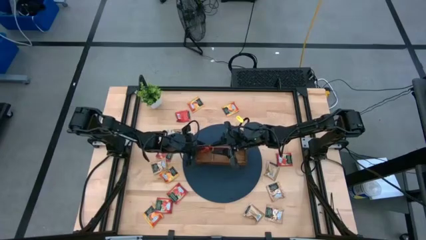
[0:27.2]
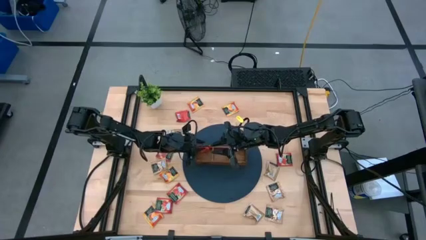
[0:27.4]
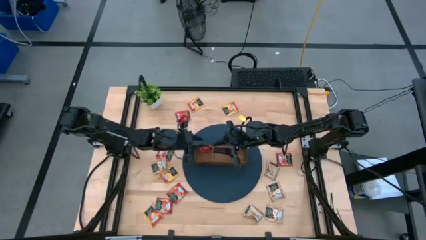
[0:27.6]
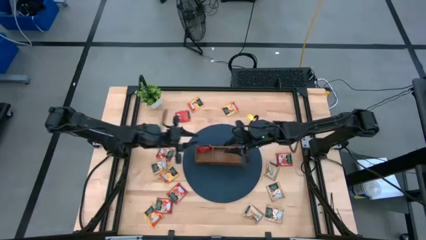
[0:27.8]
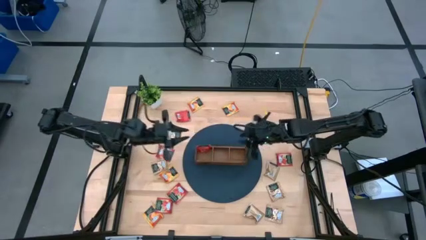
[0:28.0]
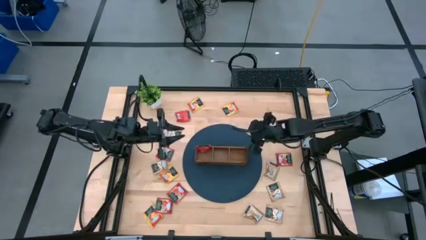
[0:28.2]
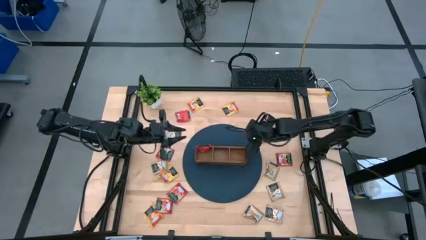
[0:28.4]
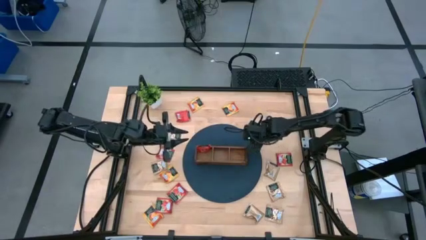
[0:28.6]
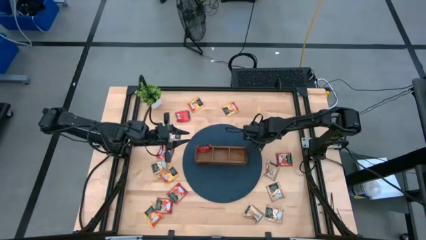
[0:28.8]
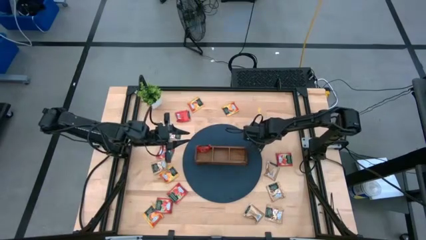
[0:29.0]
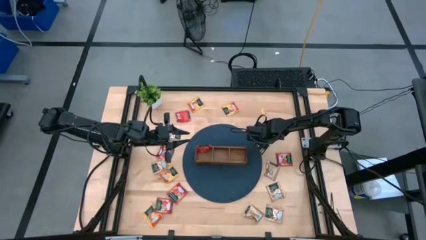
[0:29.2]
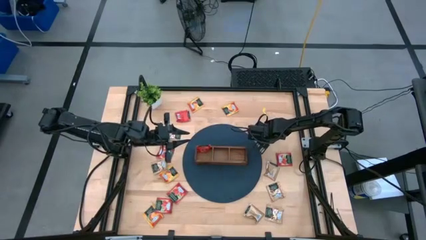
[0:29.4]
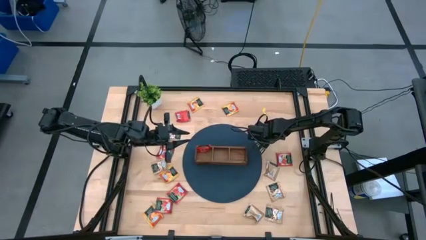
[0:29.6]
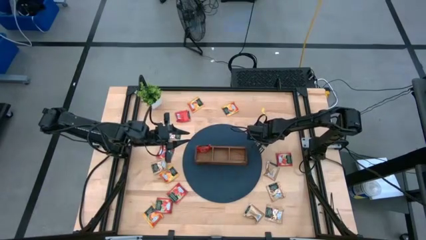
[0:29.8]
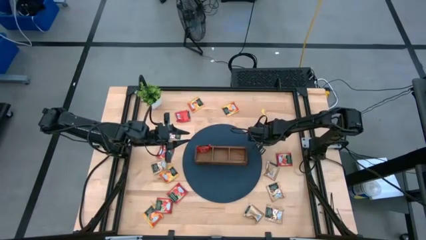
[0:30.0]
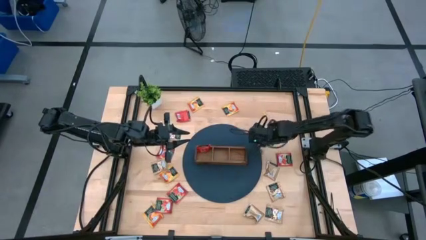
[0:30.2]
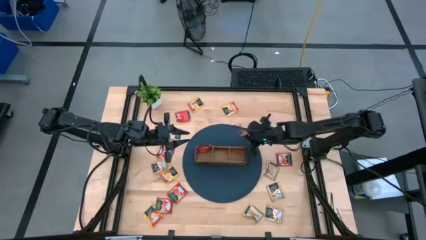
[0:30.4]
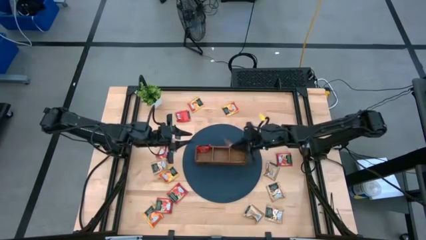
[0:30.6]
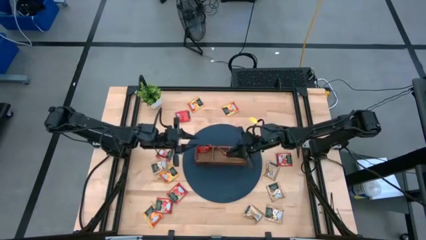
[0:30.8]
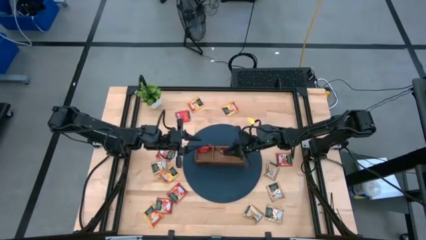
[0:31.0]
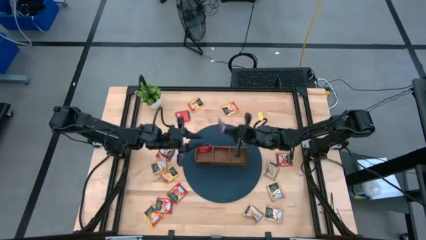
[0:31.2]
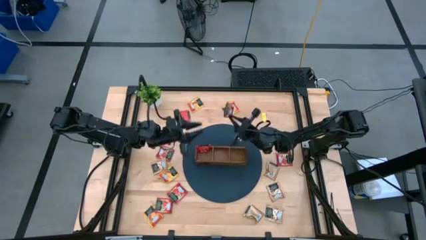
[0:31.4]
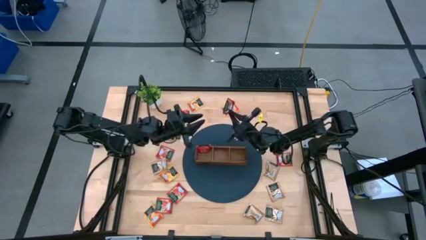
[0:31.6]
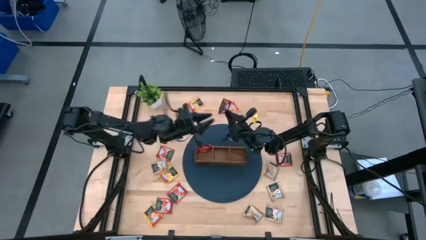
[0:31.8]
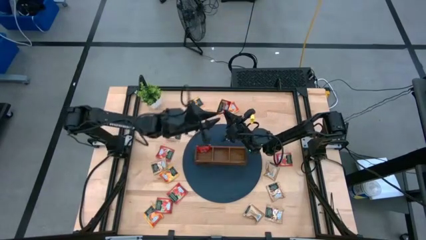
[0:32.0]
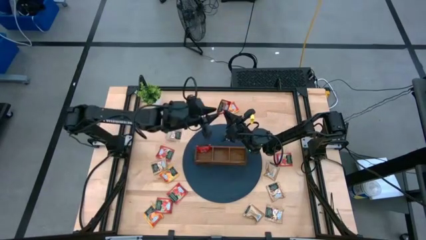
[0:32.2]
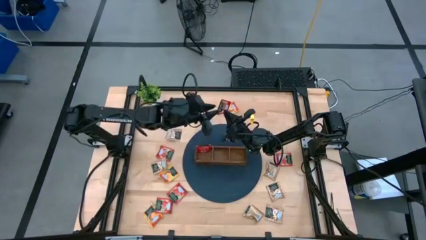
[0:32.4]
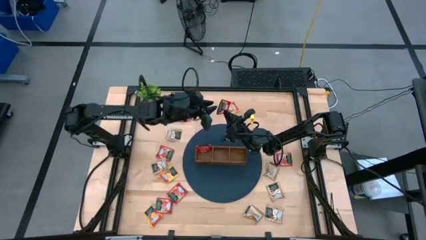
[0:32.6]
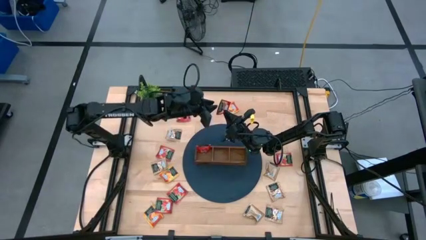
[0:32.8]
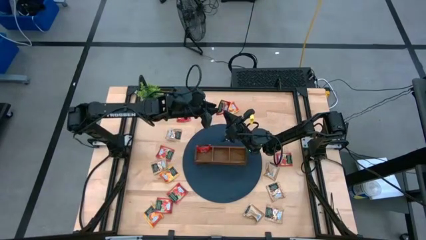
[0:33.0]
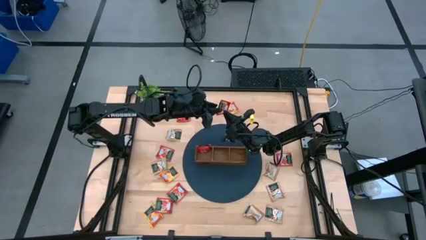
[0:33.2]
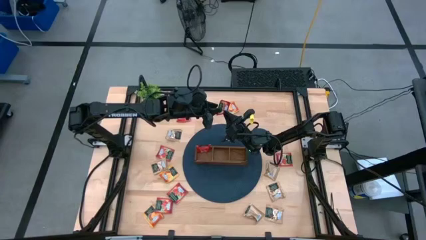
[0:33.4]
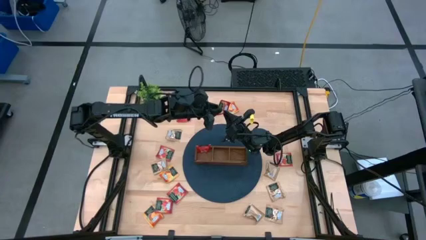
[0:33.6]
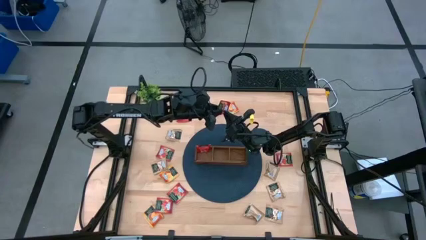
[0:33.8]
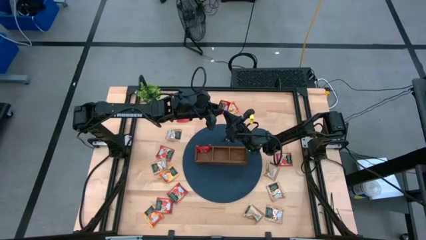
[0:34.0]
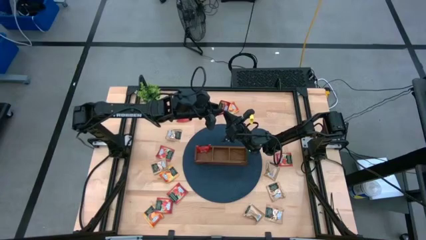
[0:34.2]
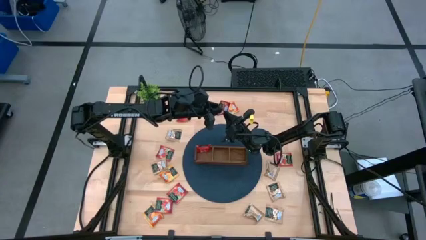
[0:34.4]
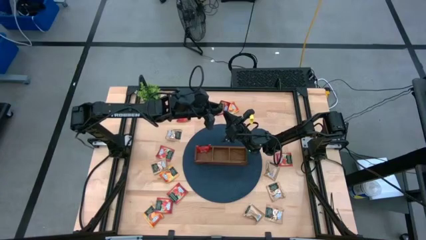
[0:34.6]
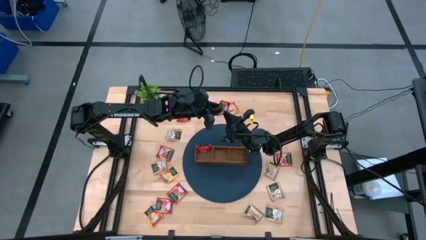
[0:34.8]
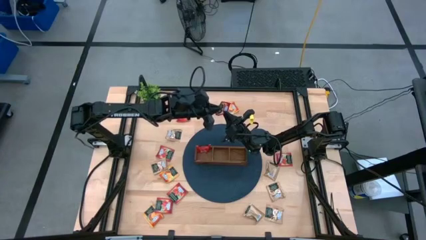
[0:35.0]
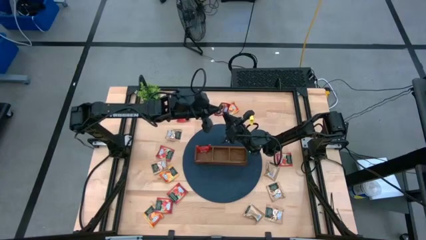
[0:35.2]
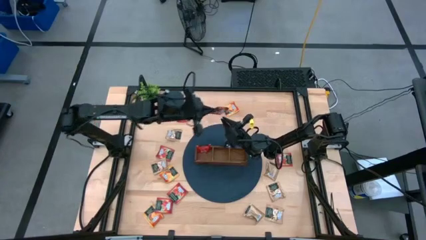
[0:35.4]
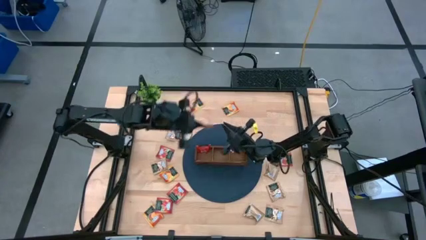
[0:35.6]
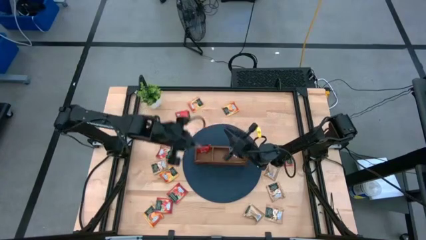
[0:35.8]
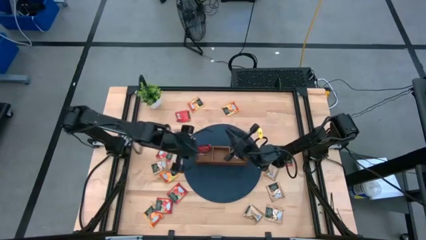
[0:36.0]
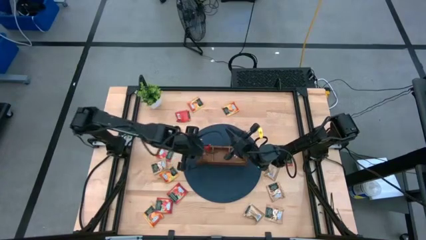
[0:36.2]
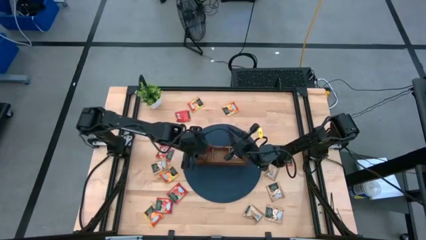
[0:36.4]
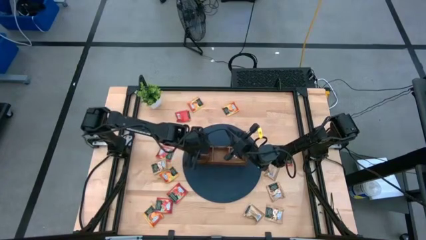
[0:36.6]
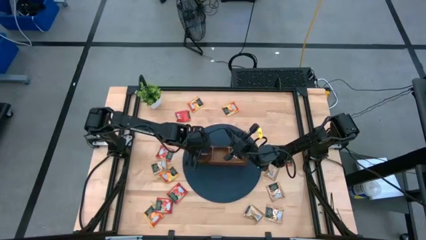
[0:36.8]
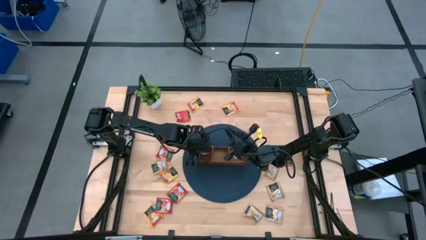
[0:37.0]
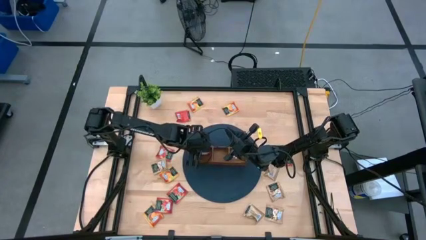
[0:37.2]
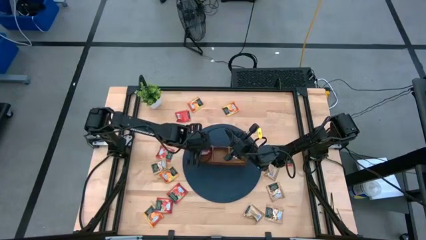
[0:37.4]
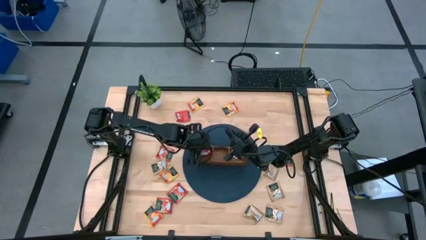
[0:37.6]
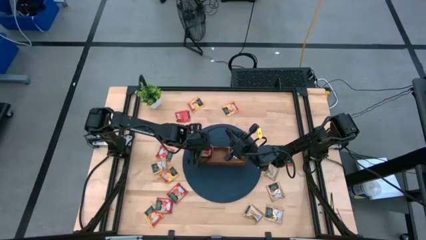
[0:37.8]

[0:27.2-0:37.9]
Task: Pick & Place Tea
Put the red tea bag into the left section of the wooden organizer
